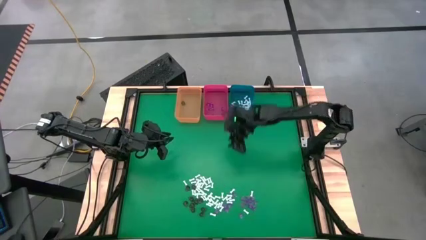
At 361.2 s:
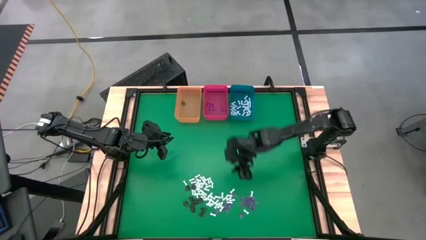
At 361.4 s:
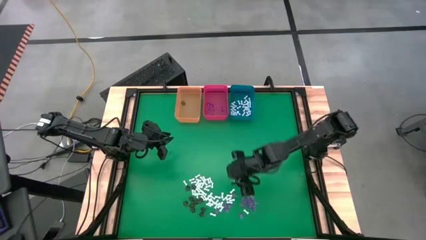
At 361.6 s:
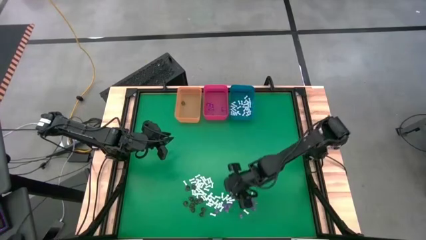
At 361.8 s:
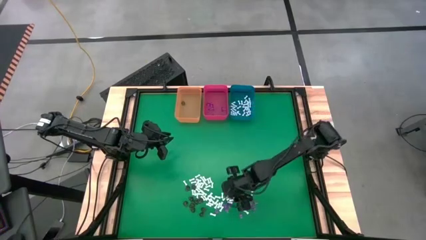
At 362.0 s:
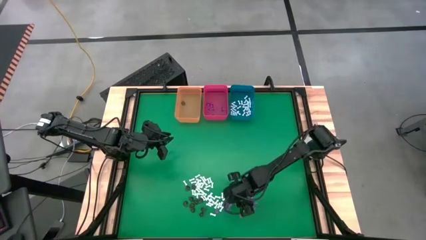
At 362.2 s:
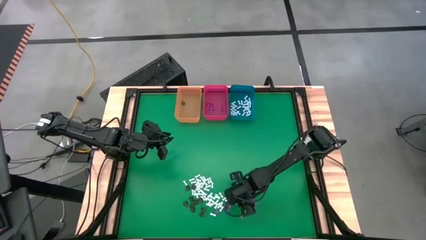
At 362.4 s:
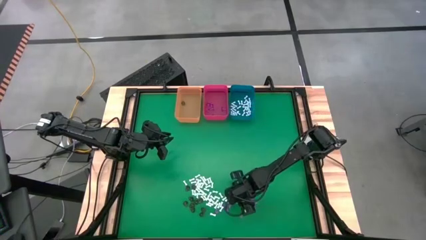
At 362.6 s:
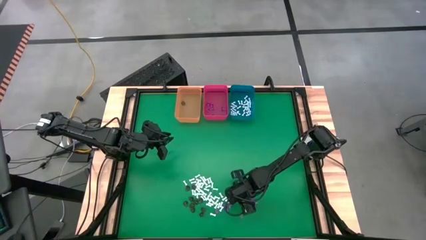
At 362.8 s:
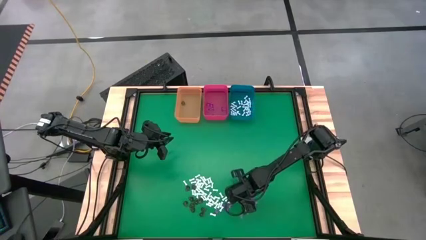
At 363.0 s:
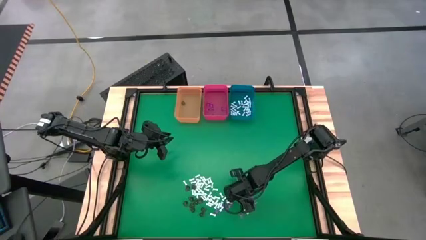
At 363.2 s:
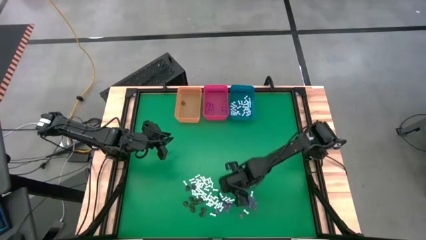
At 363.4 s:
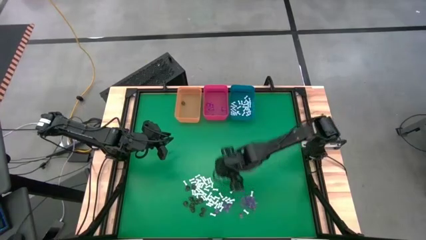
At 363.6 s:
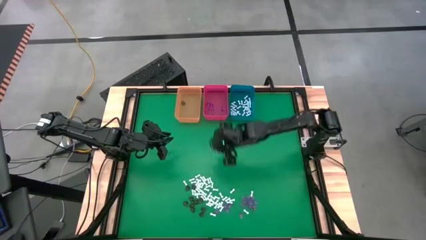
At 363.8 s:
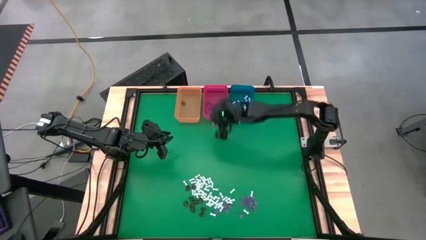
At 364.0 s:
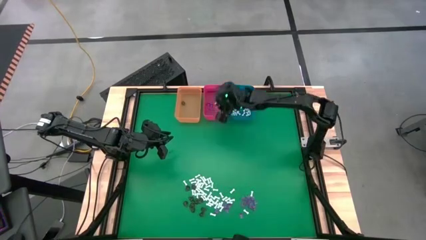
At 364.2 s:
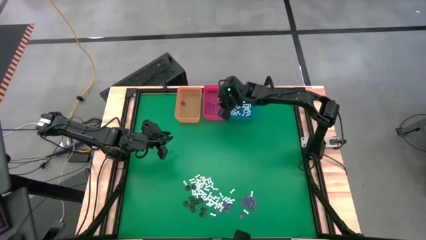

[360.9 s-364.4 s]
Task: Sort Halloween decoration
Put the violet witch hat toy into the red bin

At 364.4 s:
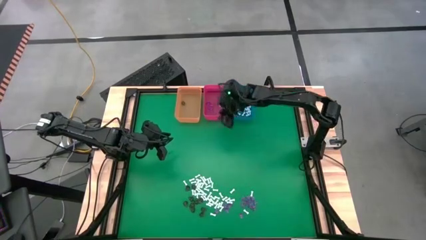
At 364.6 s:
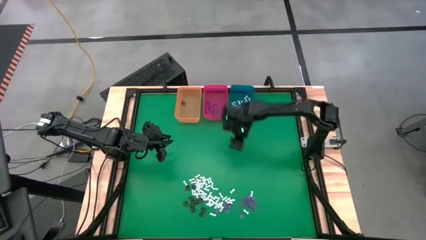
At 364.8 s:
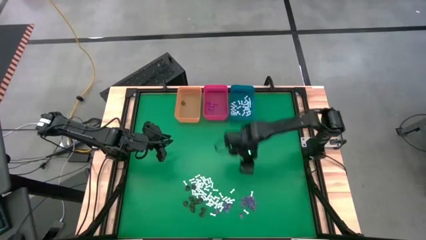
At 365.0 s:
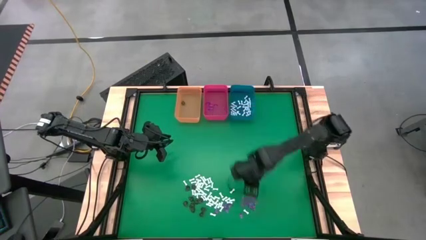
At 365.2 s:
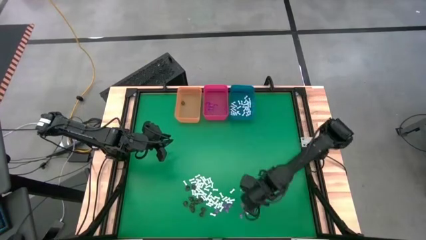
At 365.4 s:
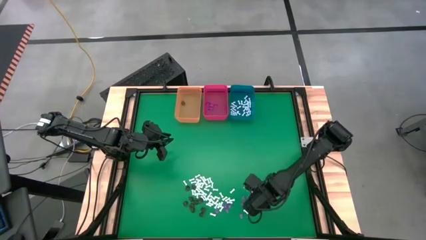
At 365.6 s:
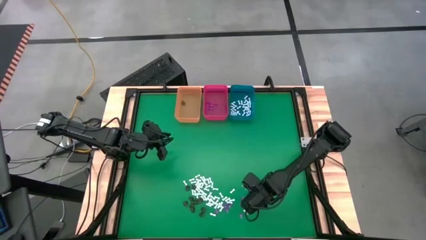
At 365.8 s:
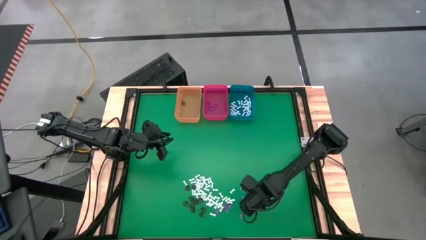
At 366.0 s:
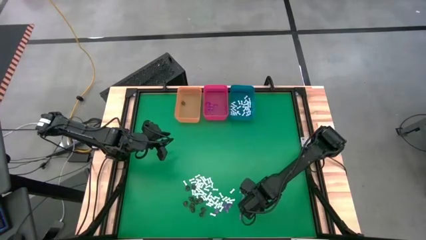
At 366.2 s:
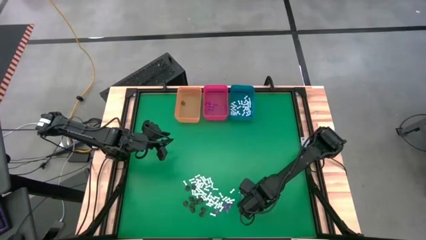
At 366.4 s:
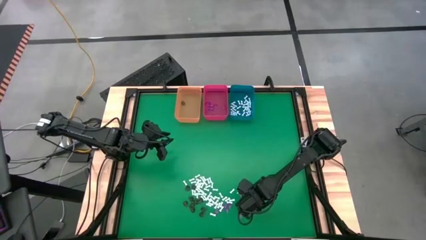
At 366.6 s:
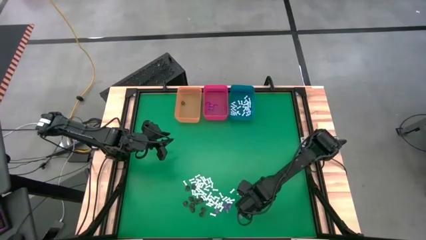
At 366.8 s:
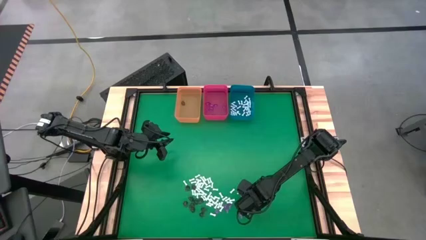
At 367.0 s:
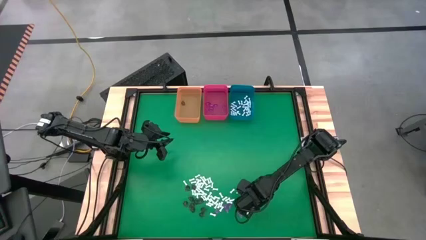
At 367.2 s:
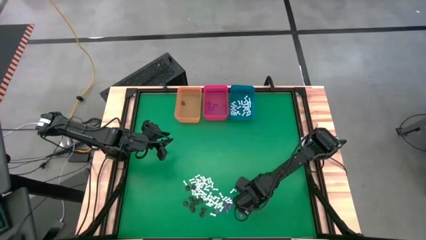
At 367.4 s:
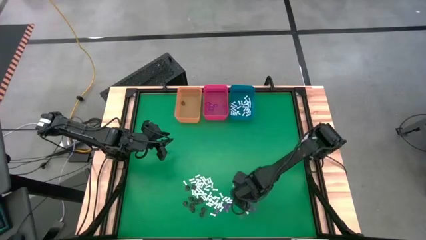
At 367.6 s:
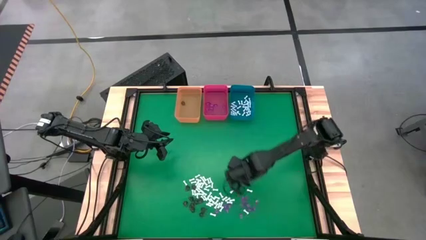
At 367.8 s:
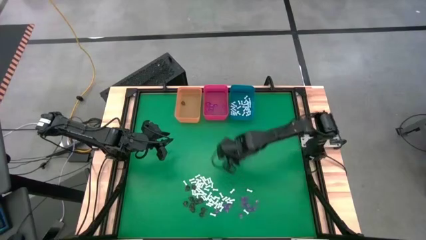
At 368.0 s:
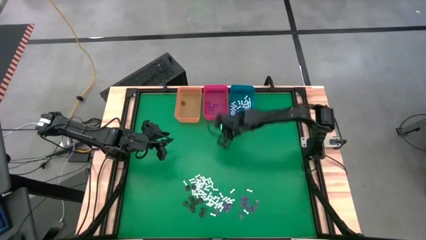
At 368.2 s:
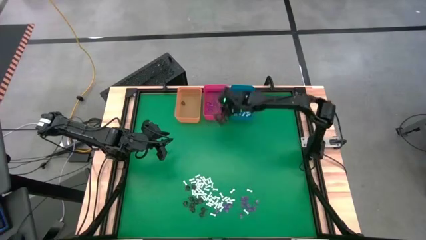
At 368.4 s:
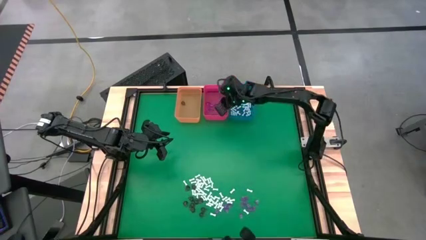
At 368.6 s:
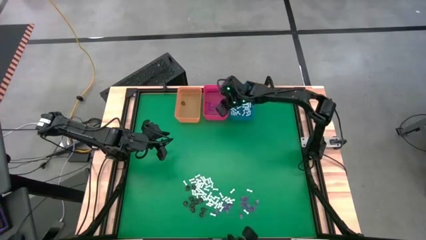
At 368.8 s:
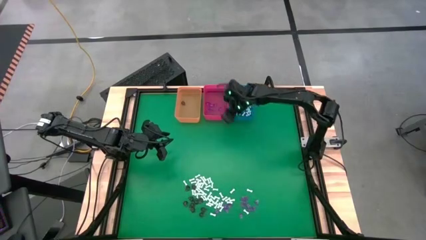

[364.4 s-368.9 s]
Put the violet witch hat toy into the red bin

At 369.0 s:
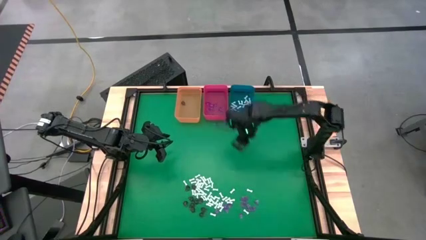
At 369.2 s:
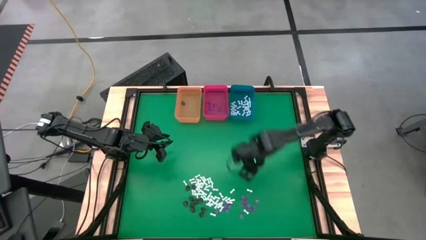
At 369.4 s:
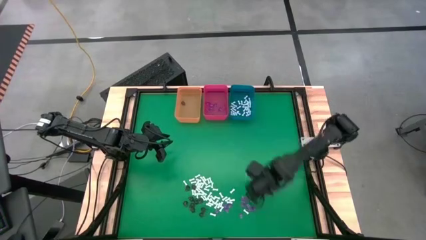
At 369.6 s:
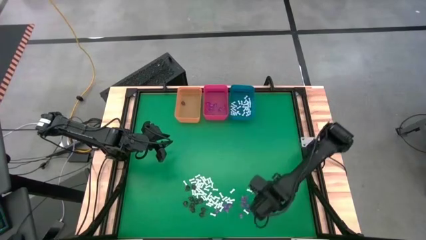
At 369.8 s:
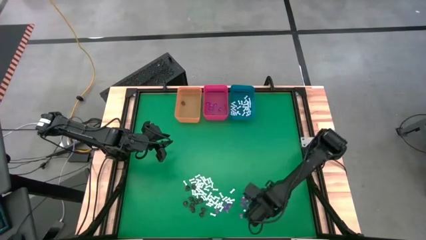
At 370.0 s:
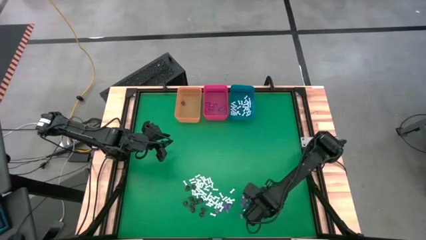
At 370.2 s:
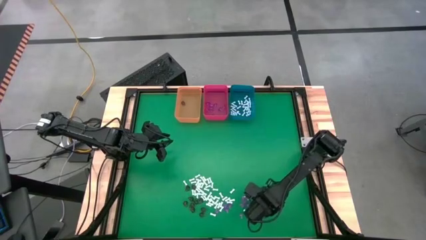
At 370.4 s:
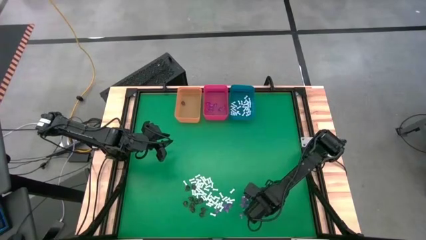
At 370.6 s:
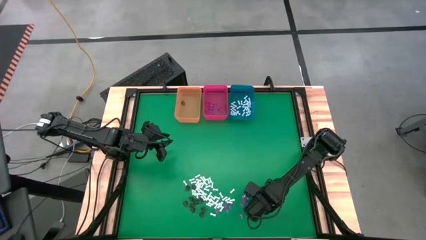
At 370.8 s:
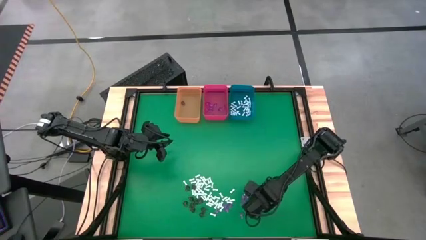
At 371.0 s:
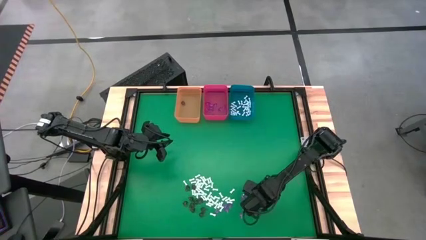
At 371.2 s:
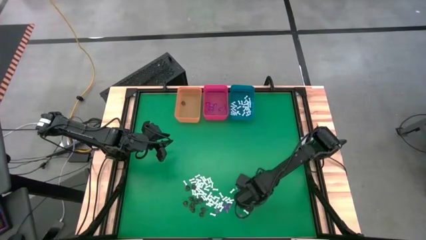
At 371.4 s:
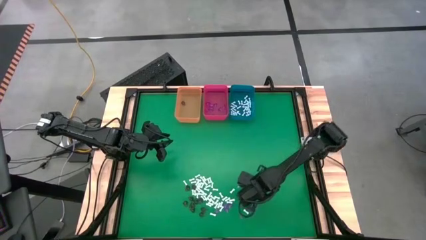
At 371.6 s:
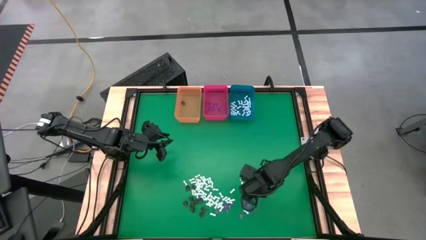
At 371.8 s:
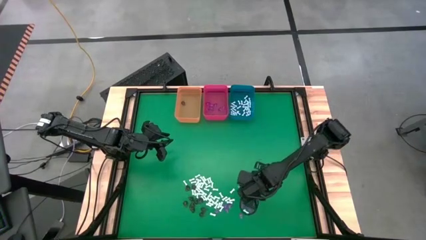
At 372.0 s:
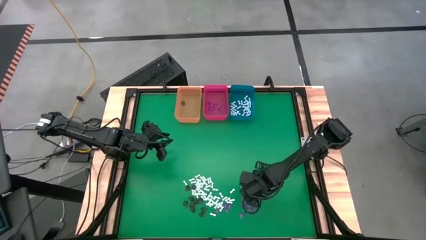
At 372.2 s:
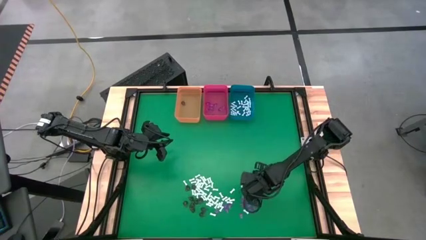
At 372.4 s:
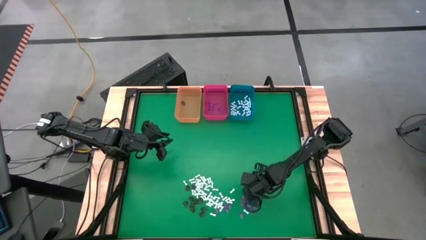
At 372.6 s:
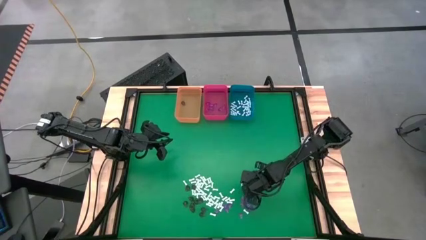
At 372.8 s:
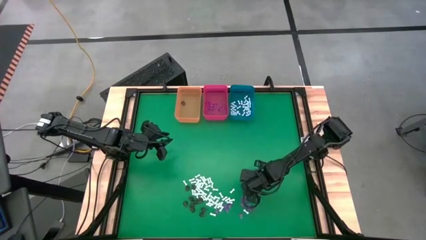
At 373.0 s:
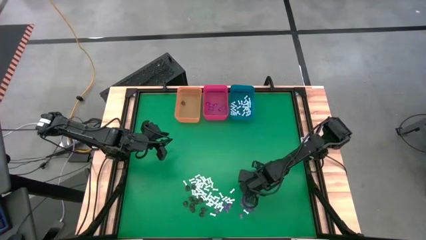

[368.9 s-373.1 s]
Put the violet witch hat toy into the red bin

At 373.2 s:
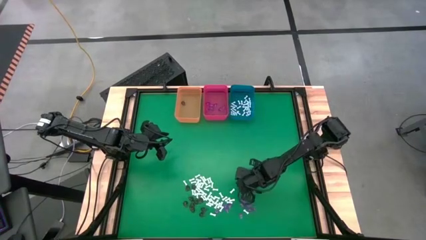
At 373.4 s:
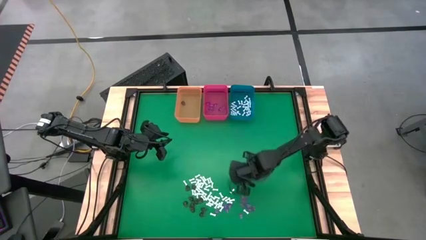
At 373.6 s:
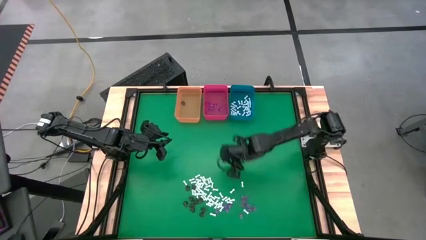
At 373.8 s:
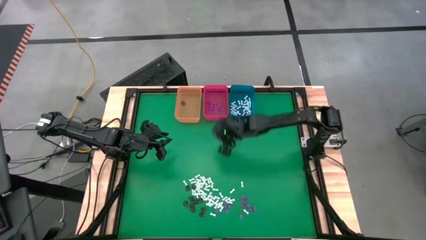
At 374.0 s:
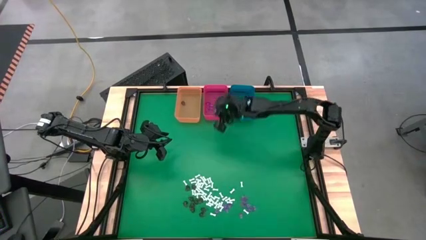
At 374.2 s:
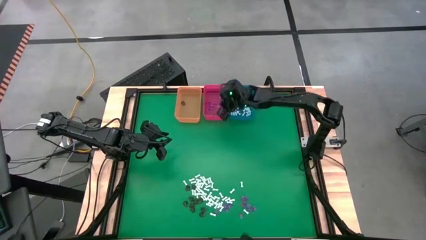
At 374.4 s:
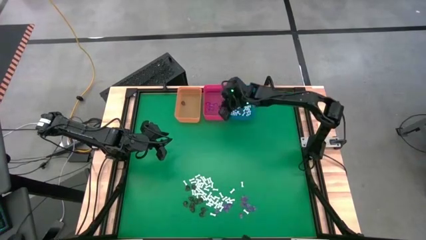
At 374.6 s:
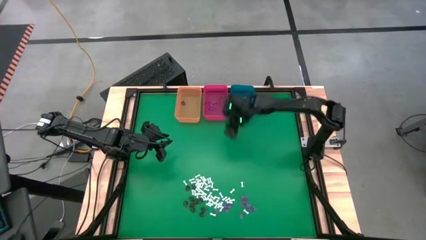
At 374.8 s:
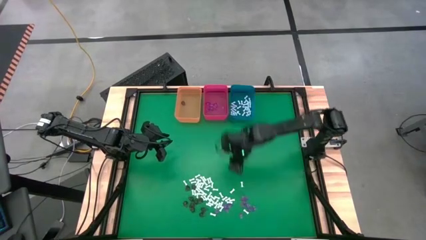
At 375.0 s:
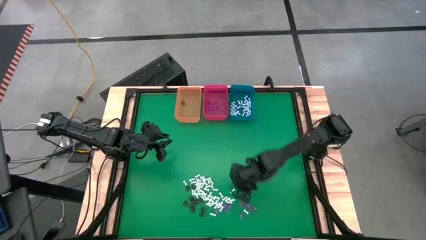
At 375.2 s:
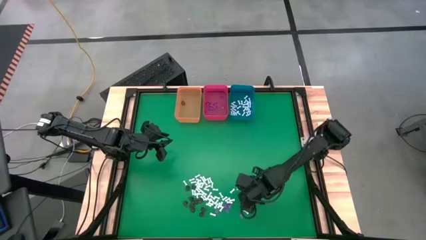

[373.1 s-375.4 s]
Put the violet witch hat toy into the red bin

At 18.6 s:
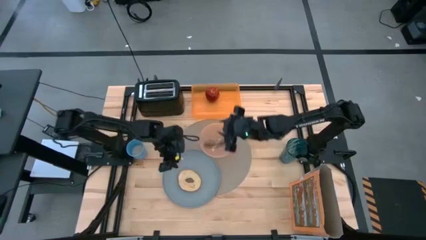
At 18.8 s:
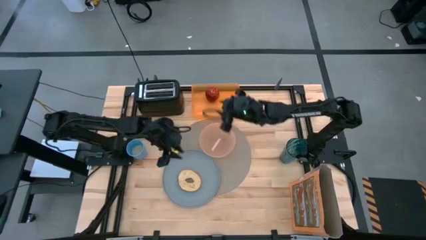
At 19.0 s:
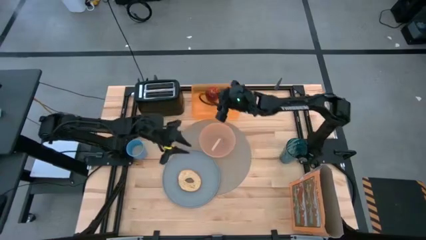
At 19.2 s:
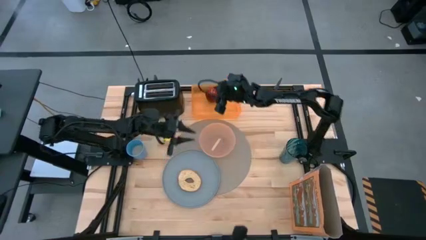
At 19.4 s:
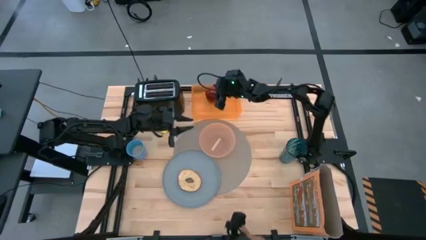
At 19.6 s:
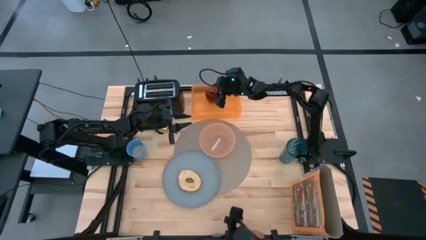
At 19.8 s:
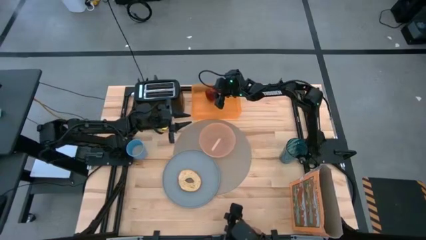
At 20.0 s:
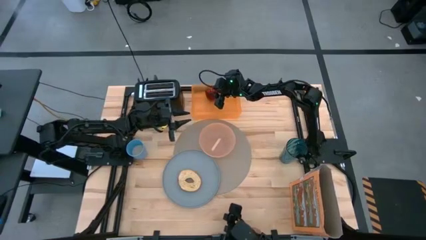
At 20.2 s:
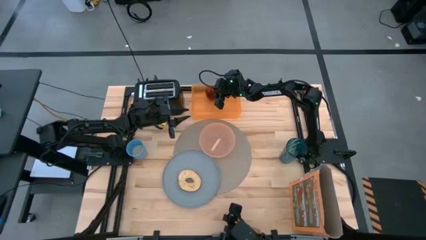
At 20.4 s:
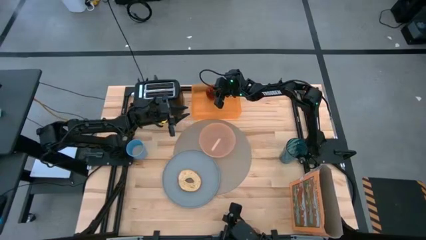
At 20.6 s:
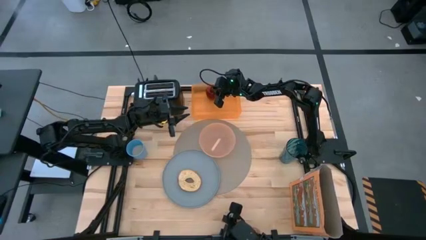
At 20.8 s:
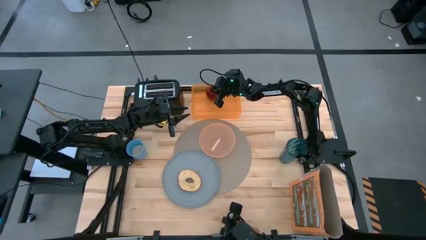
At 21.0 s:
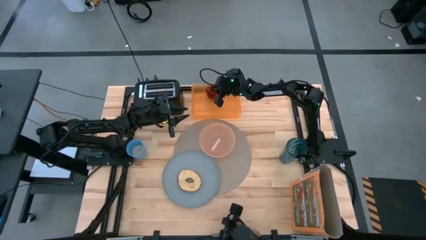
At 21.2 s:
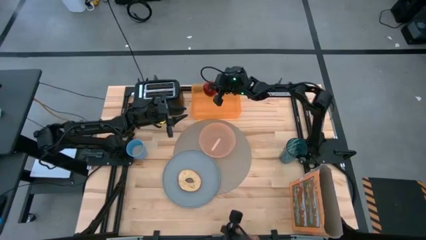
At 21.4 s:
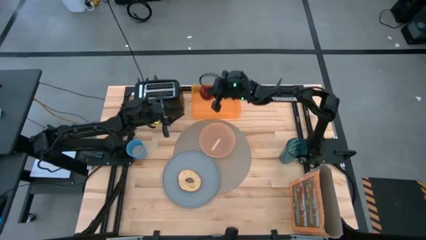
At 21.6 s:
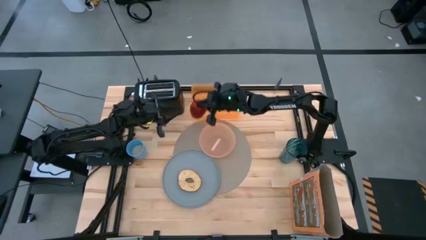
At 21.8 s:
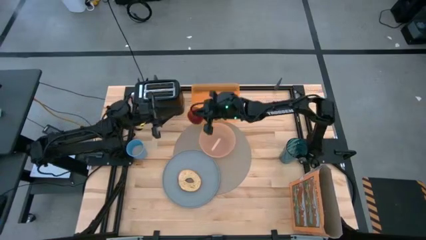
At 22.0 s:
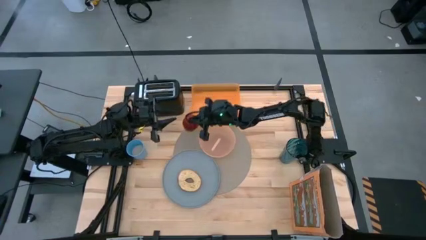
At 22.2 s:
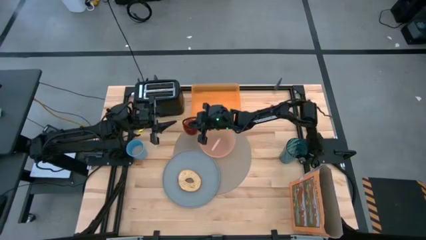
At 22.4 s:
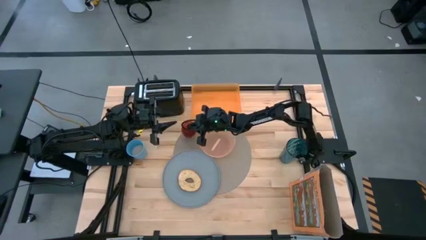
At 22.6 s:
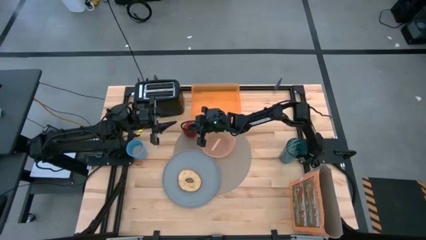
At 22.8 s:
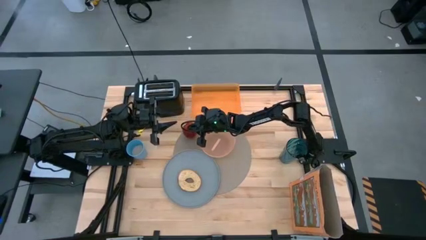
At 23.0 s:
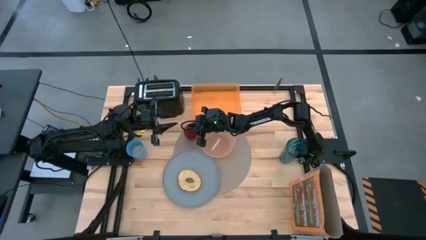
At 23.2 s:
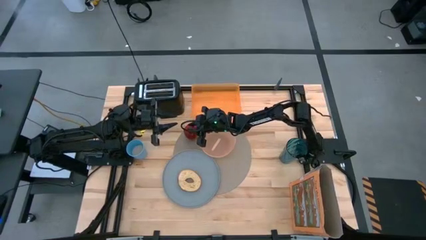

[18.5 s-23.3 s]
Task: Arrange a breakfast setting
Put the red apple on the gray mat
